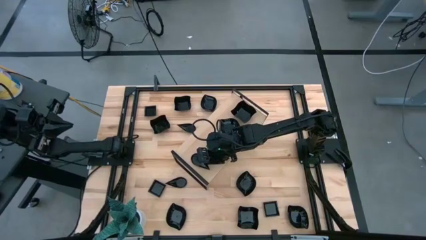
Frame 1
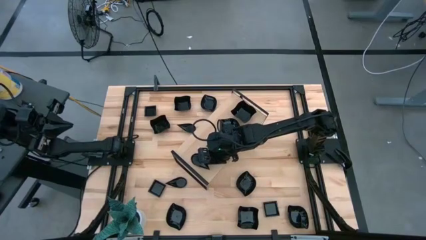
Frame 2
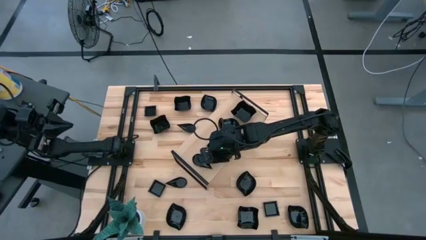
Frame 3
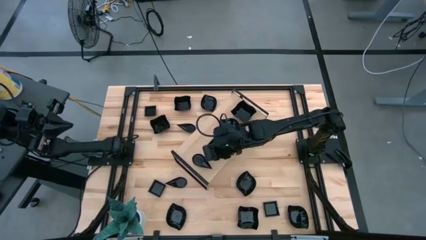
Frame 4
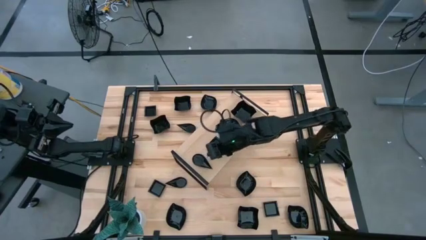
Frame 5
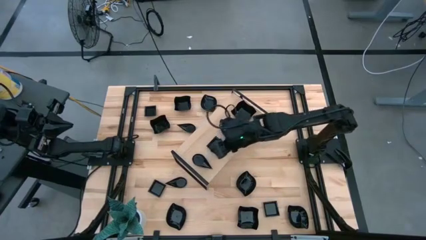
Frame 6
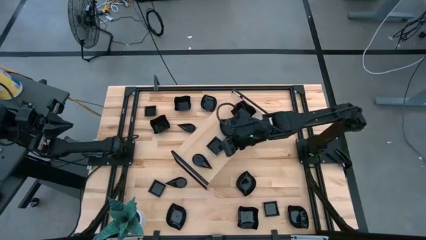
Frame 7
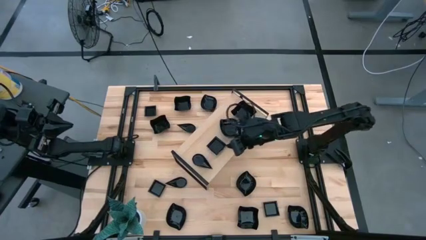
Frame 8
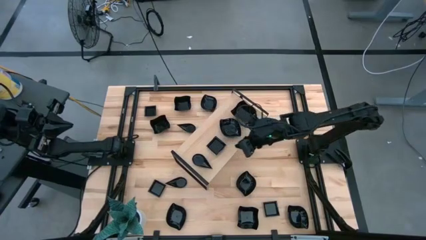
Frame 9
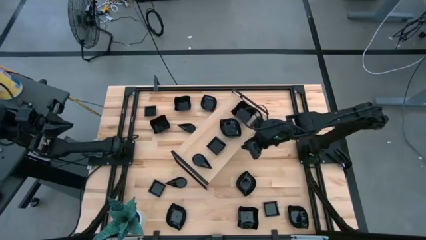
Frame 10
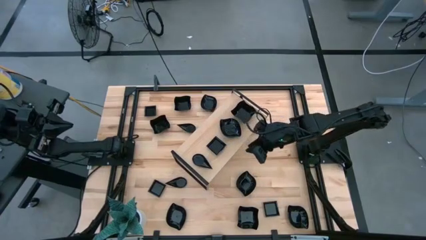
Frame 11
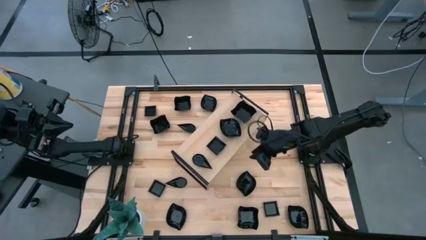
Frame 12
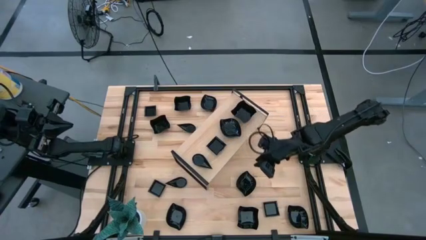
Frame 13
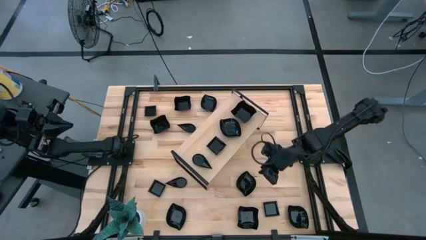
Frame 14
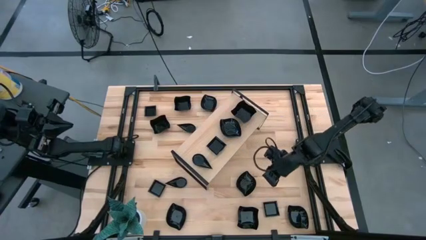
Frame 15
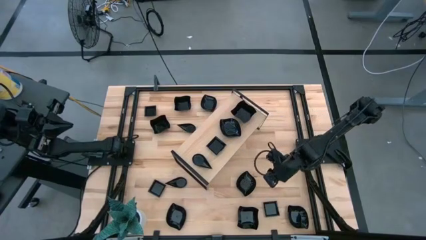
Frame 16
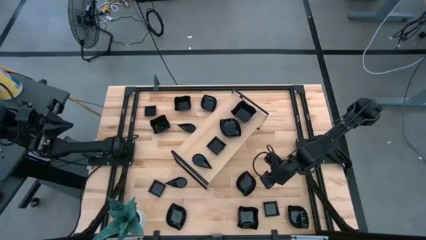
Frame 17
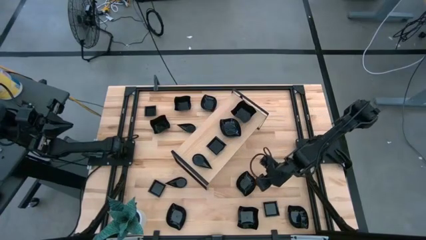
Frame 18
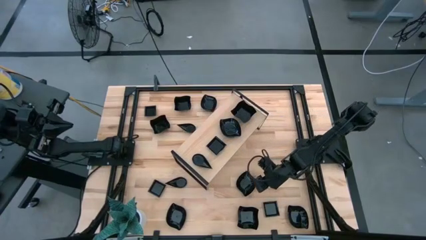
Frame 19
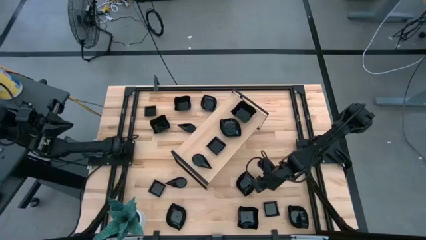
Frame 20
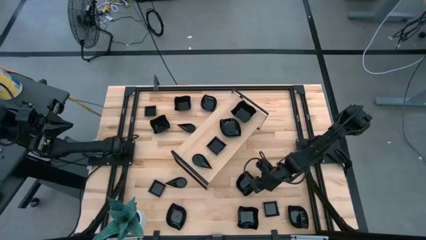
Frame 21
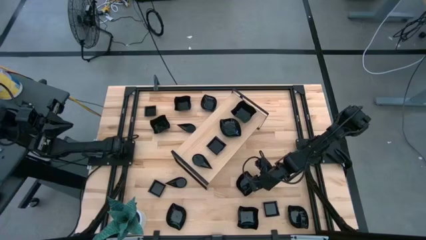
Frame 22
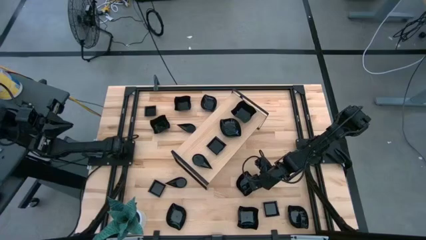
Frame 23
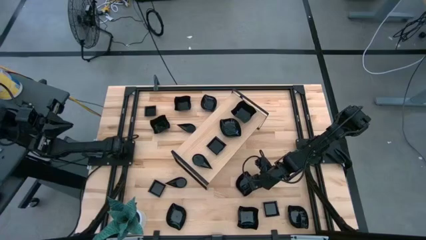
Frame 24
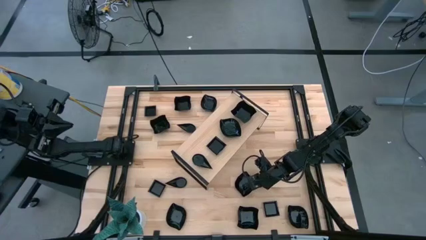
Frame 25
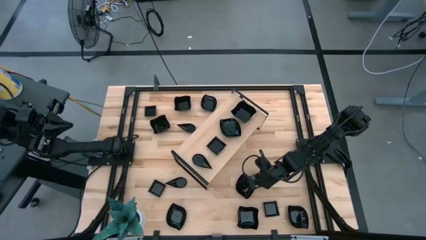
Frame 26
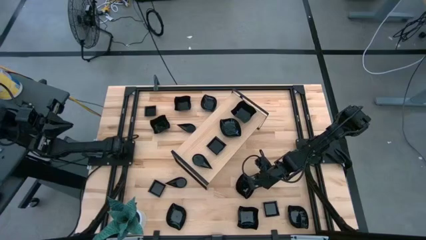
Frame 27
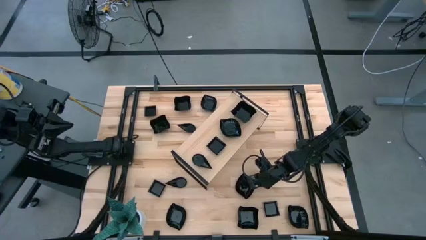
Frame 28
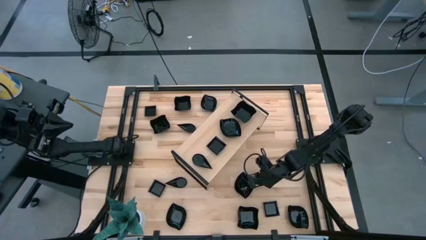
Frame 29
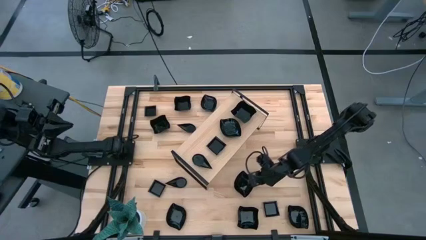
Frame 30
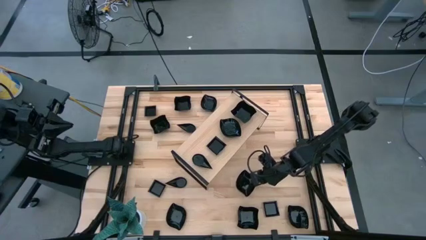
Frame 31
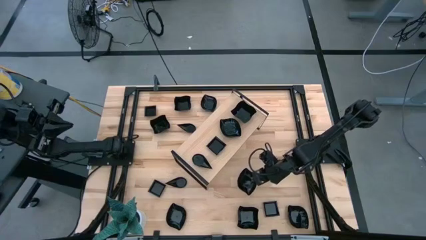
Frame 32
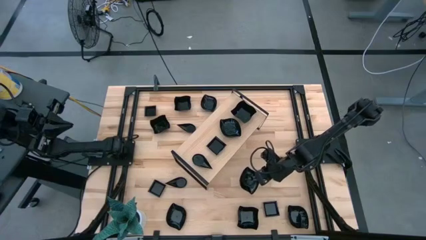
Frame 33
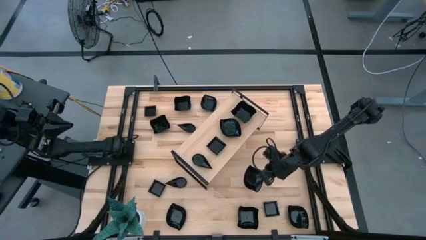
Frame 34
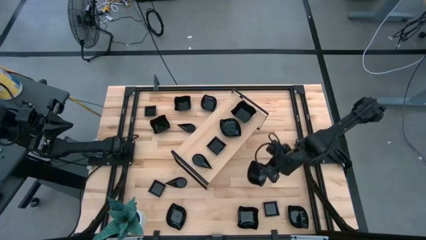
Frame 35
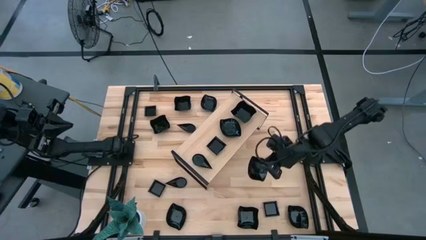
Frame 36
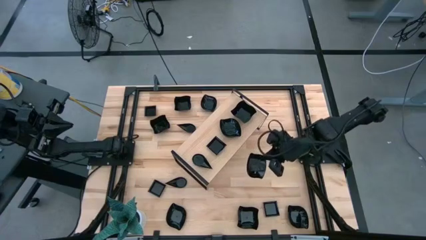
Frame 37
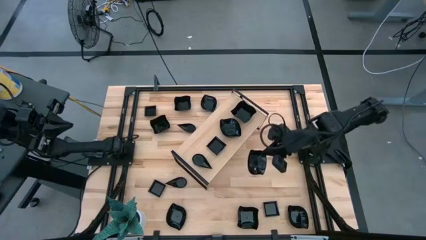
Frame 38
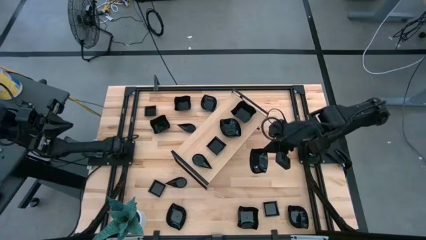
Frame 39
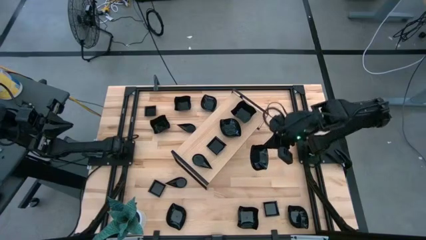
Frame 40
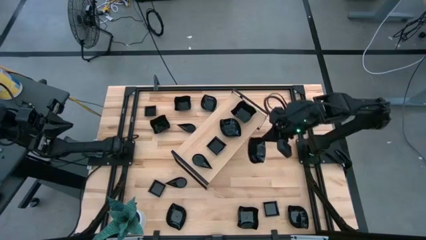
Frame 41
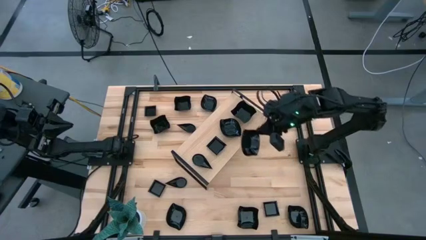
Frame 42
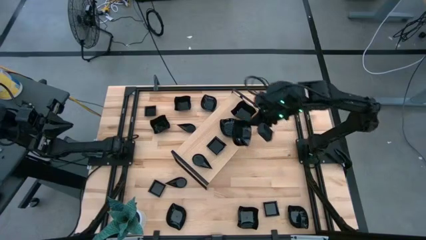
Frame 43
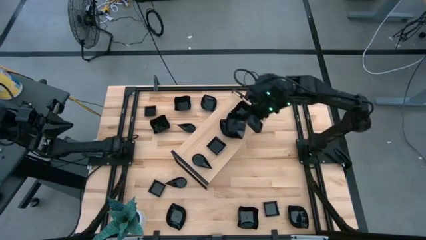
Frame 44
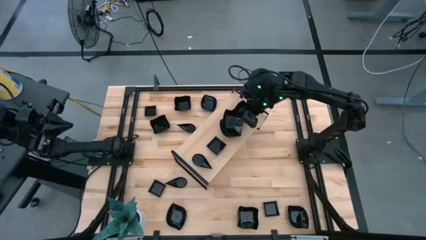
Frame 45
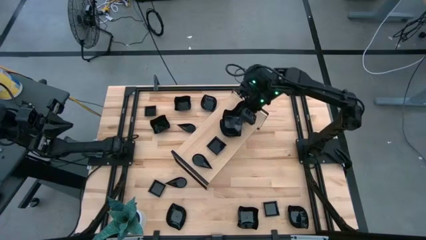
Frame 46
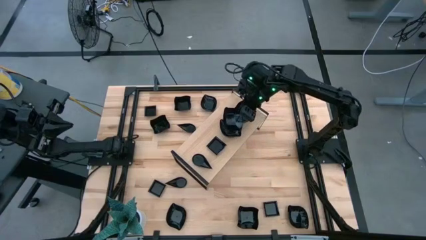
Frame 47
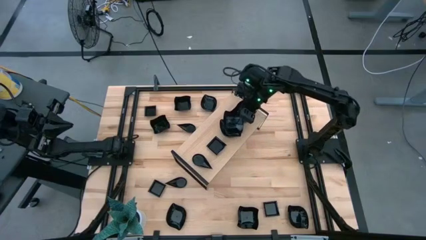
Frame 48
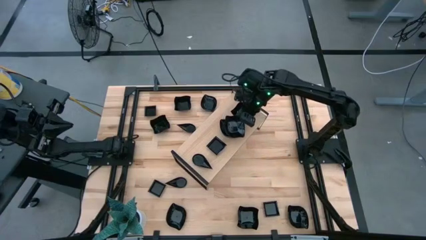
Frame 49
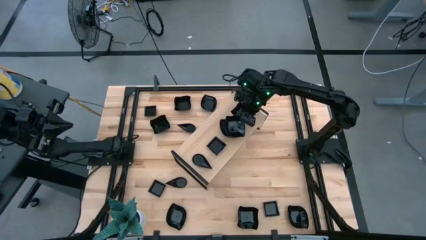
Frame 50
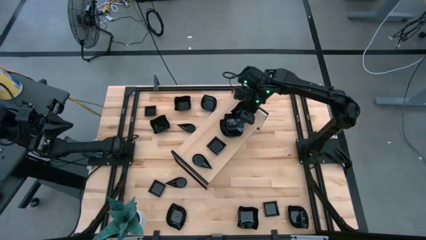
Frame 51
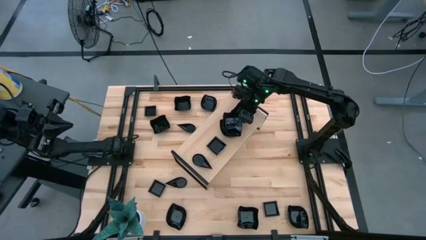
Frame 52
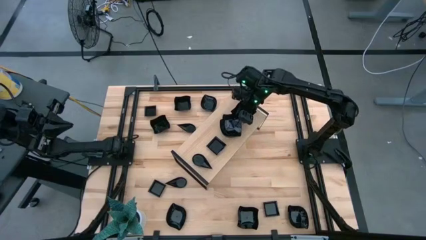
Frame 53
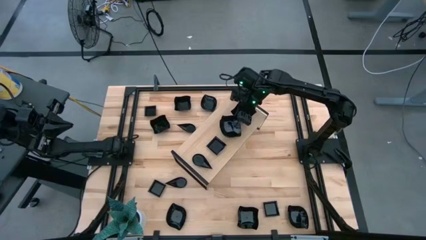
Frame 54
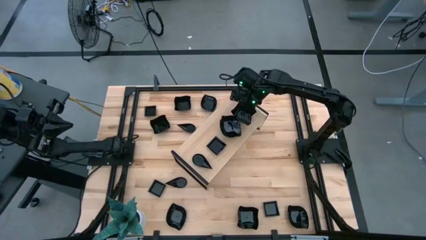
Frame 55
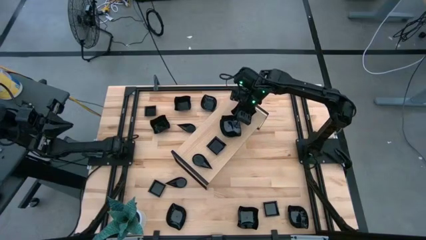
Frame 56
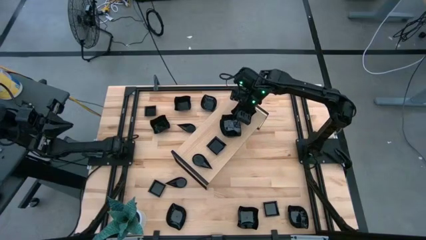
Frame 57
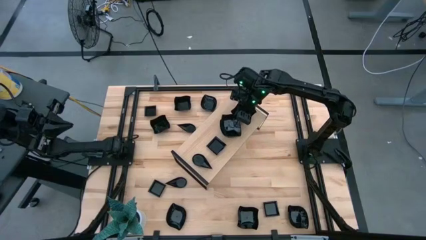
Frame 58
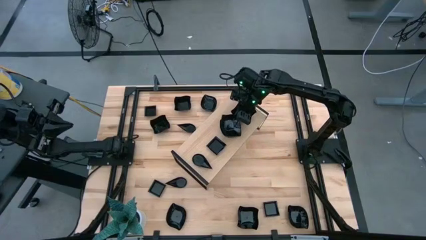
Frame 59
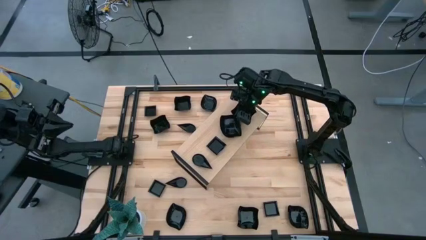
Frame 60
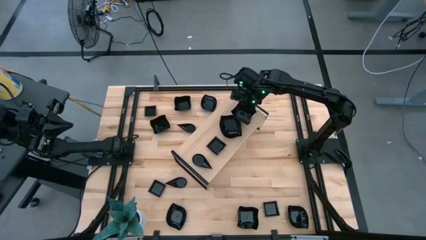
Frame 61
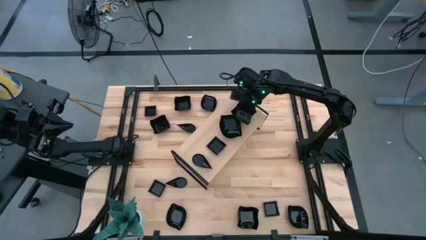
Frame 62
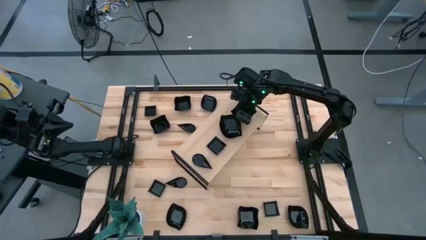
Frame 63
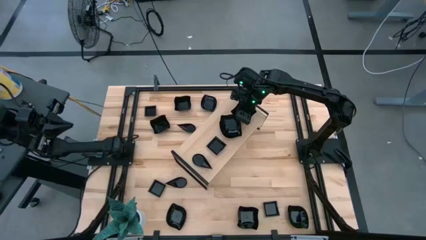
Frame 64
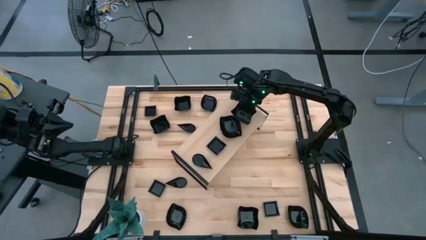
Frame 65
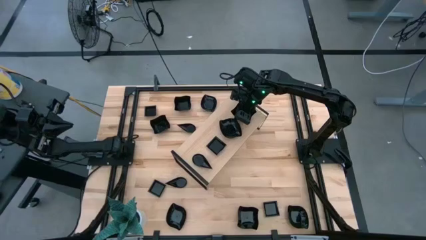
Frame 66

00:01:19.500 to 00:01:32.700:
Task: Pick & Place Mini shaped plates
Stack the black leaf shaped bowl on top of the black leaf shaped bowl on the shelf
